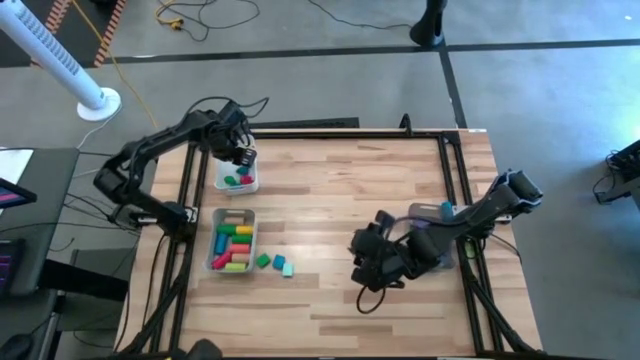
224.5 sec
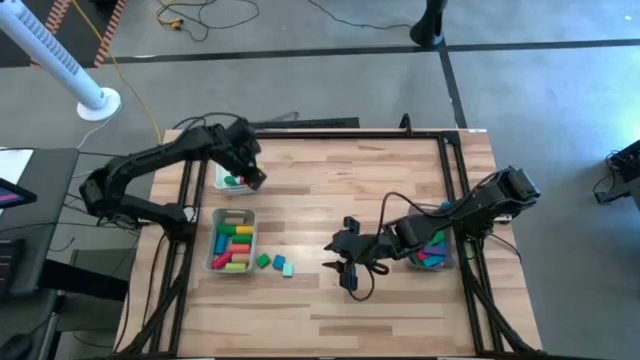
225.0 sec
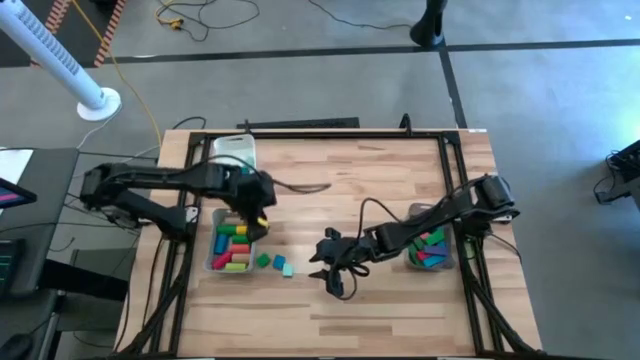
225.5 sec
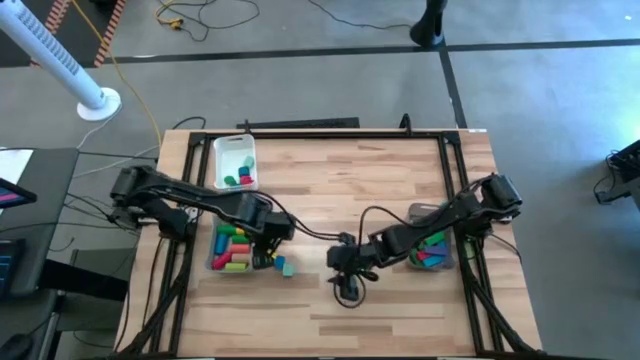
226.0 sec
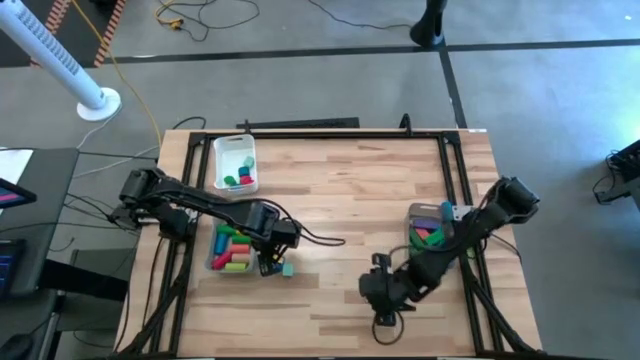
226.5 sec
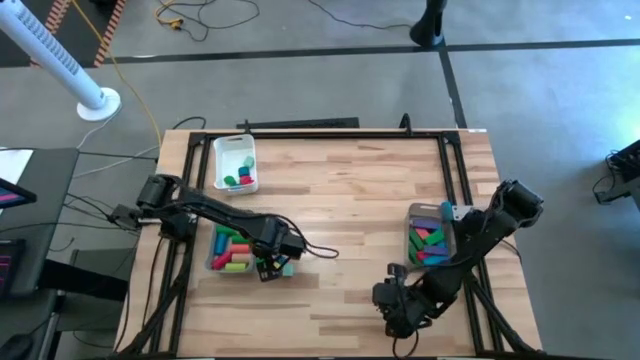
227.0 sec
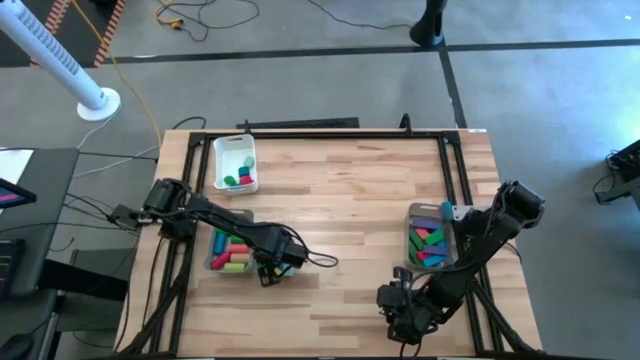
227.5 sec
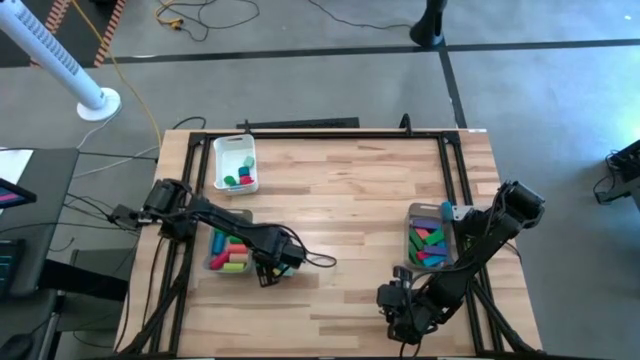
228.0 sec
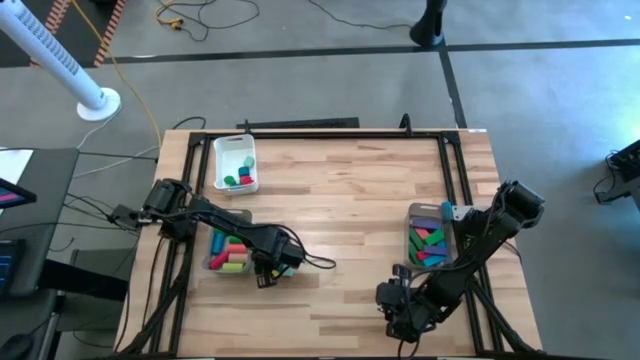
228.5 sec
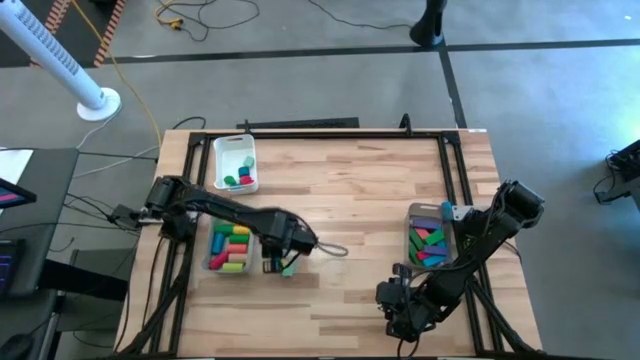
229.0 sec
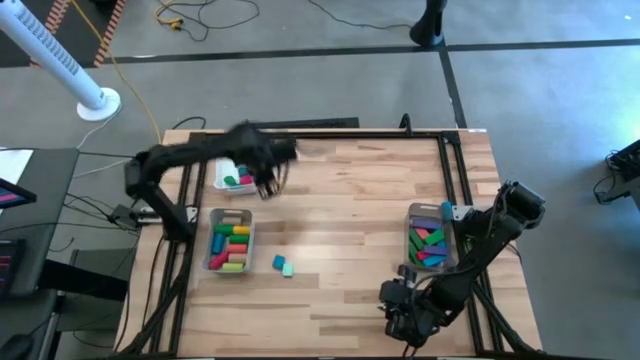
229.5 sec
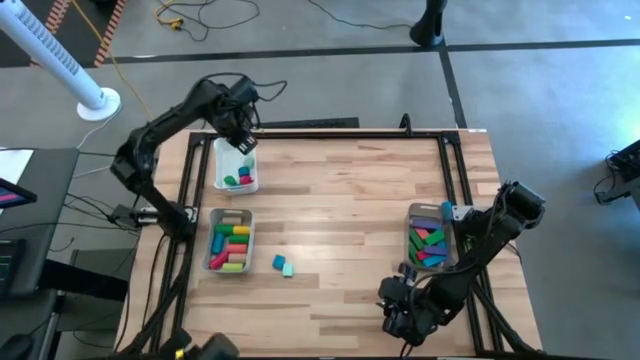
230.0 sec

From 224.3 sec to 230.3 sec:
Task: Sort blocks by size
Put the dark green semicircular block into the white bin

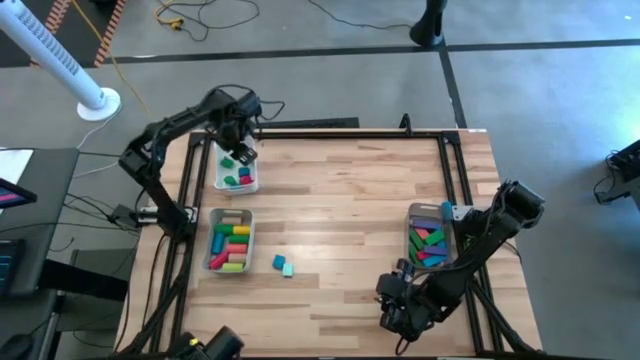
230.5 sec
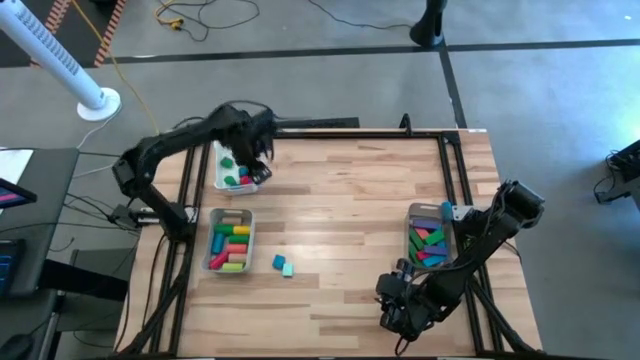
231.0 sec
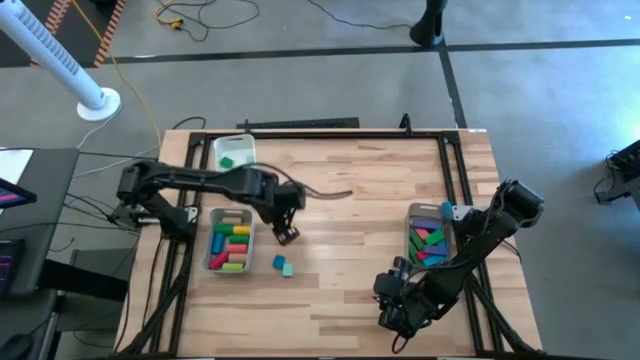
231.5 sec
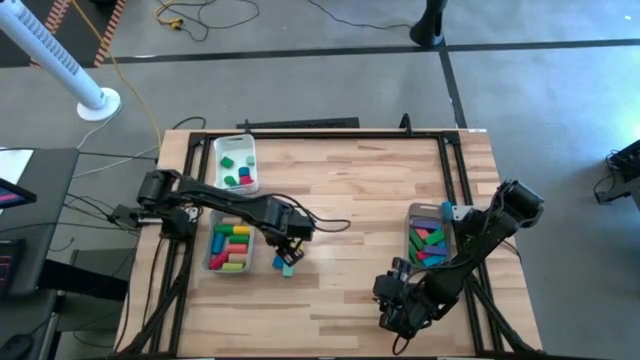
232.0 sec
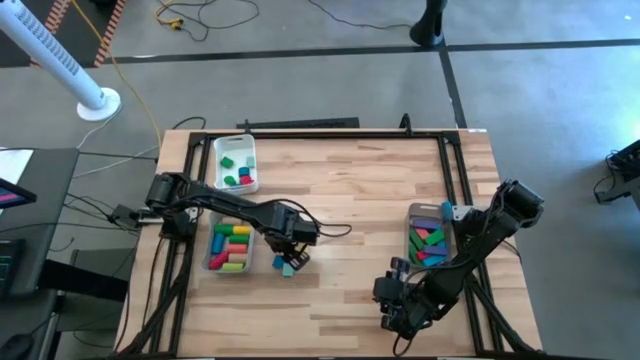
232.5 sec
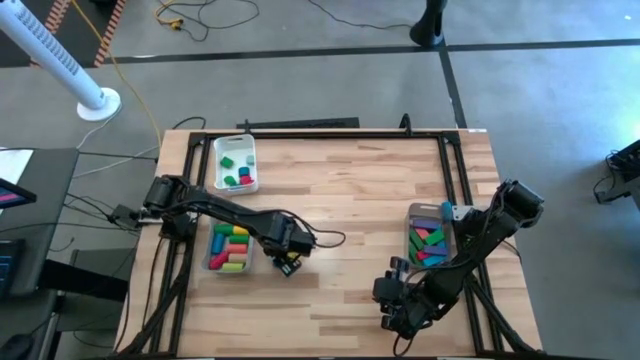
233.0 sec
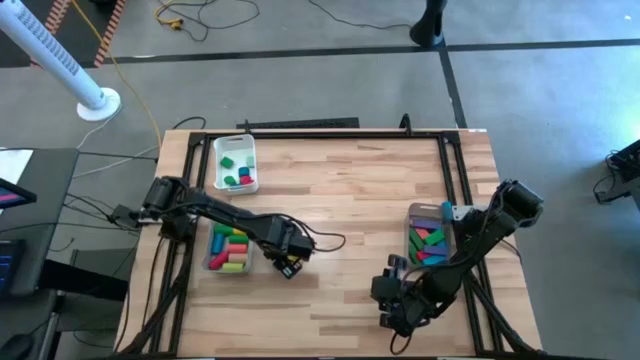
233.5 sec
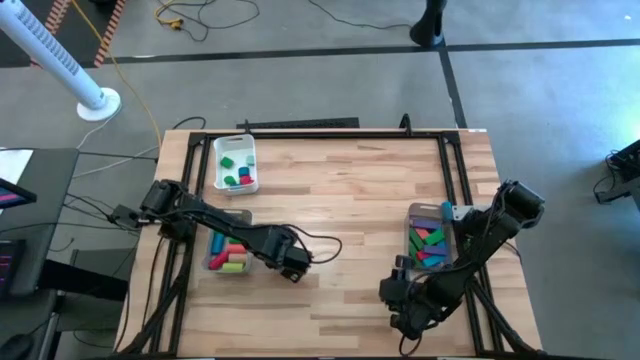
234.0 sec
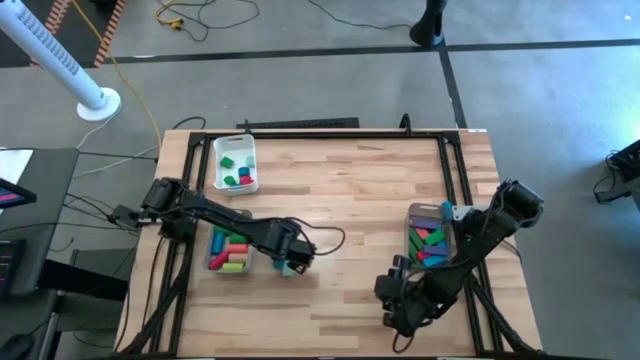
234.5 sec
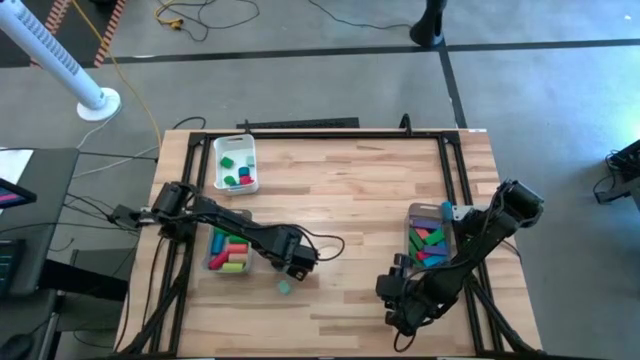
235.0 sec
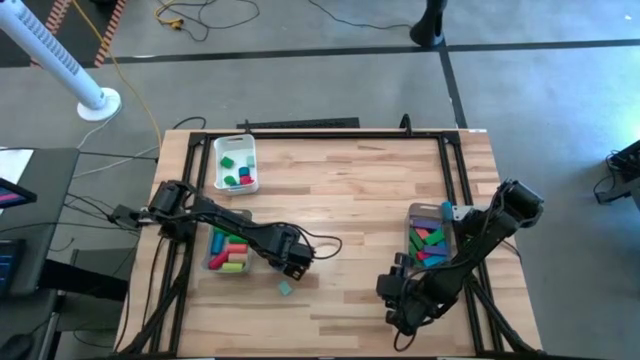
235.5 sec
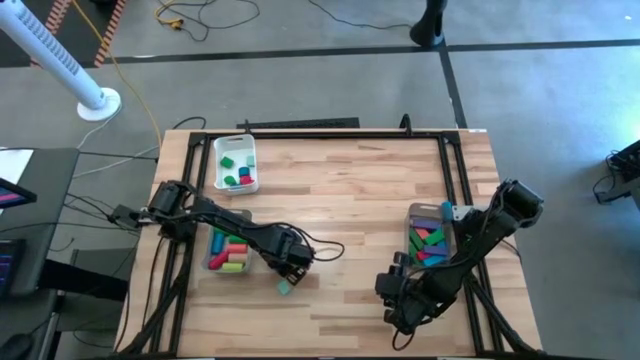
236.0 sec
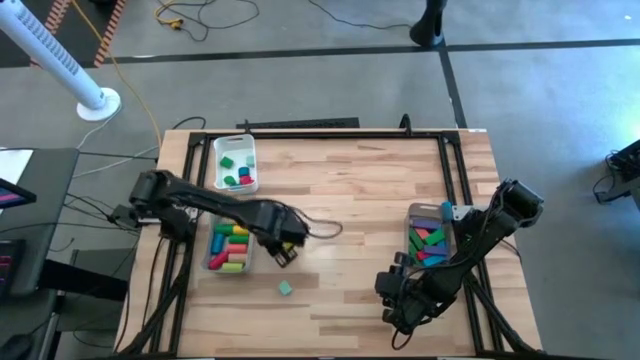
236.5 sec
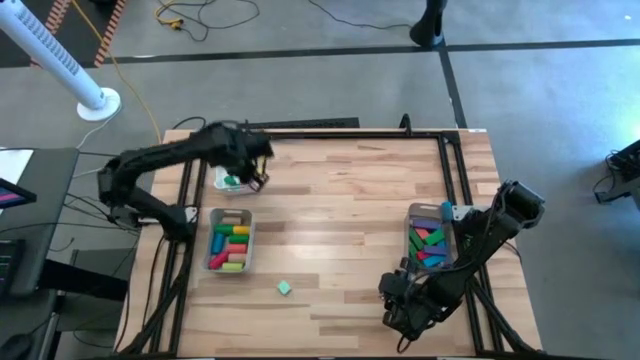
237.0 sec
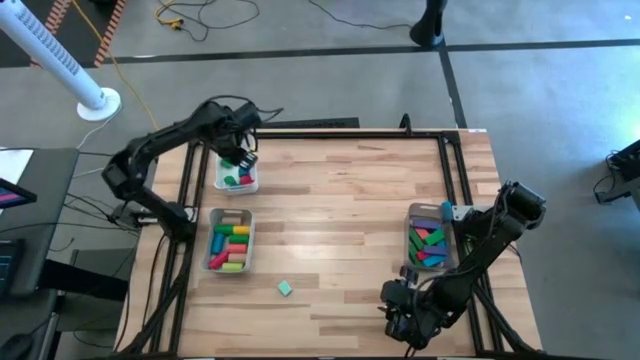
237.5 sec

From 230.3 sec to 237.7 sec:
Put the blue semicircular block into the white bin

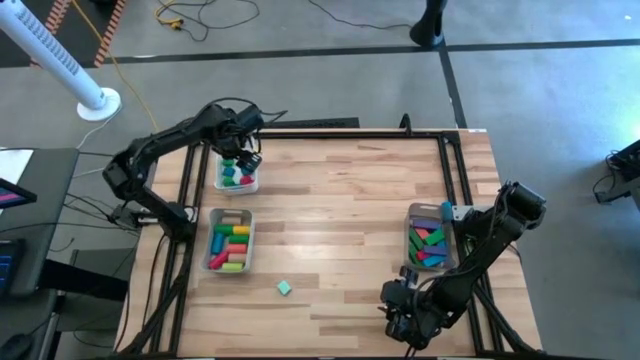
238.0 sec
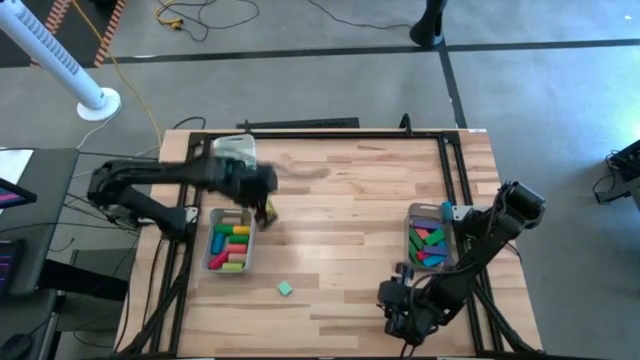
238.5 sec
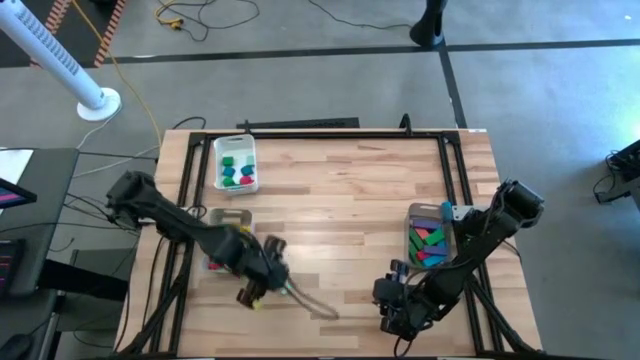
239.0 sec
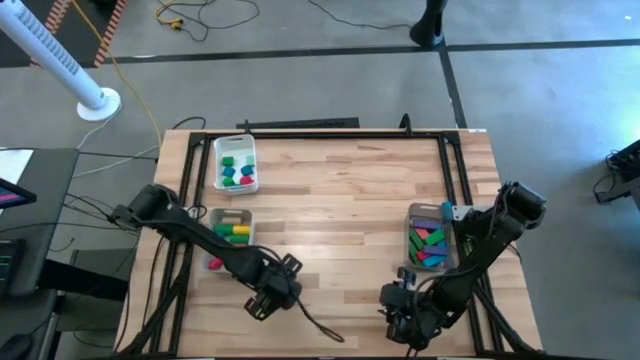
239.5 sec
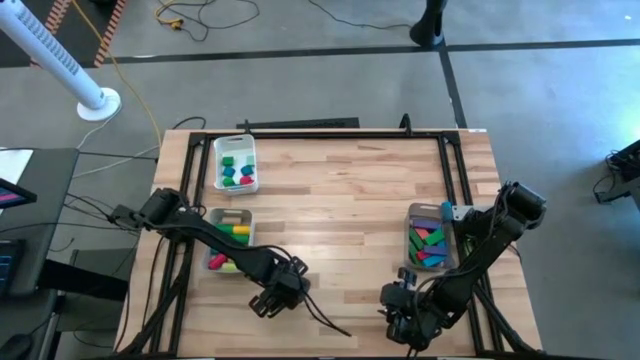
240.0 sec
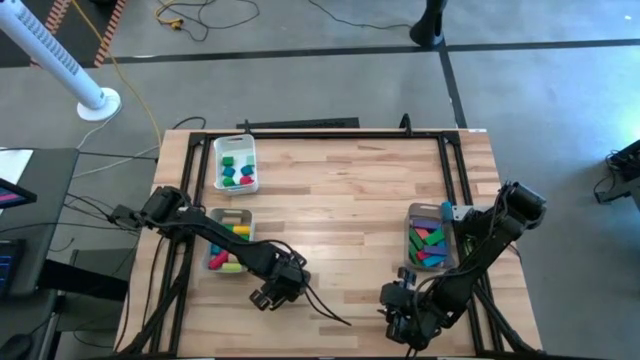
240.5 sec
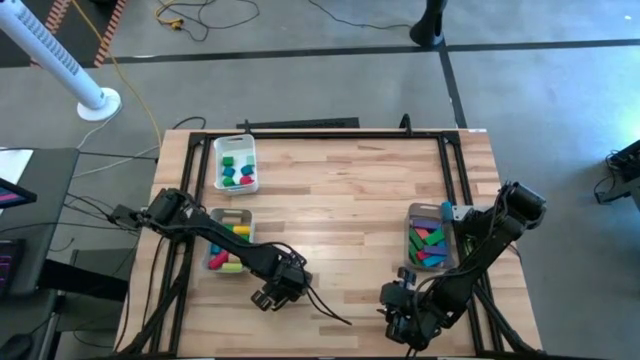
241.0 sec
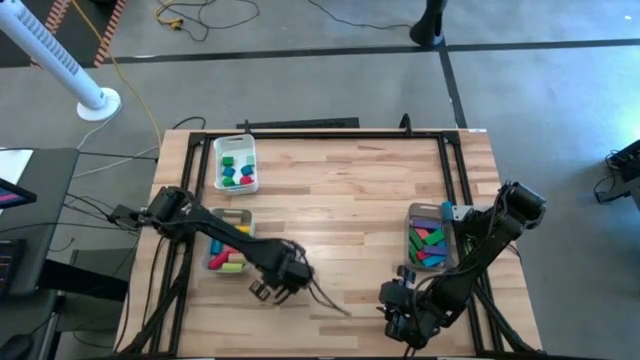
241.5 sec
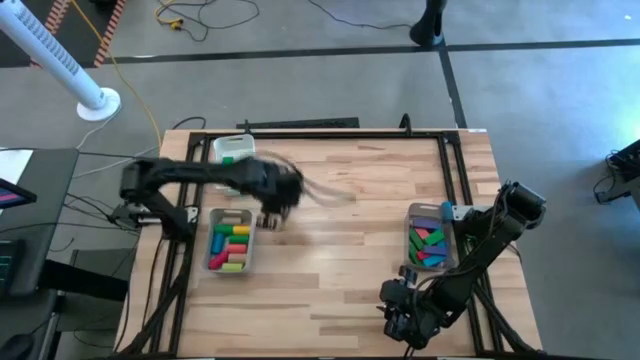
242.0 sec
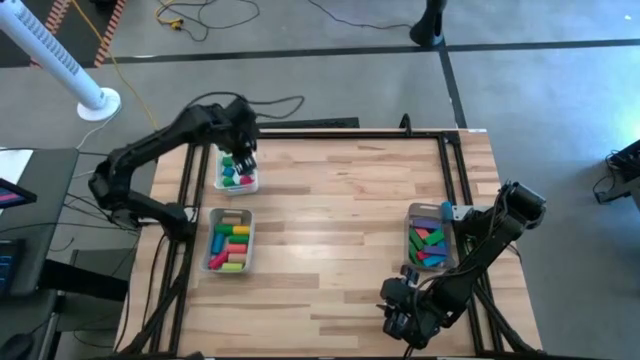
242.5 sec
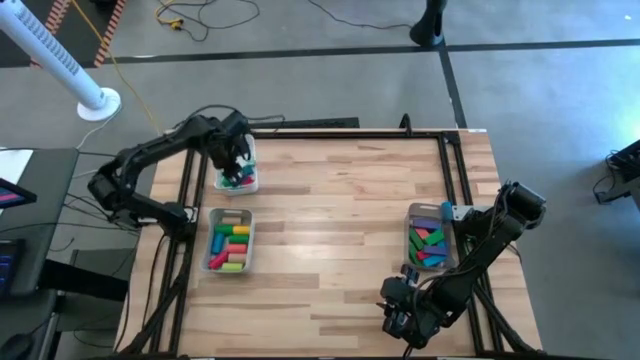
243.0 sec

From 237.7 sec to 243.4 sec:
Put the light blue semicircular block into the white bin

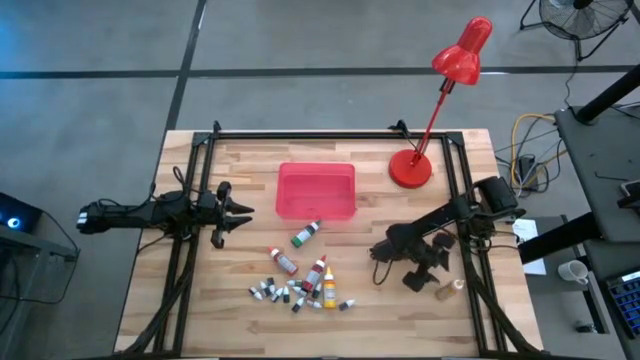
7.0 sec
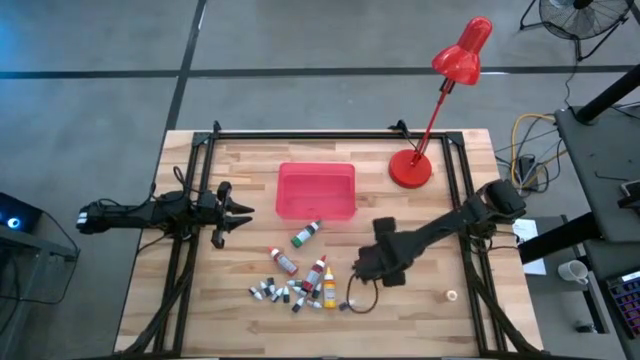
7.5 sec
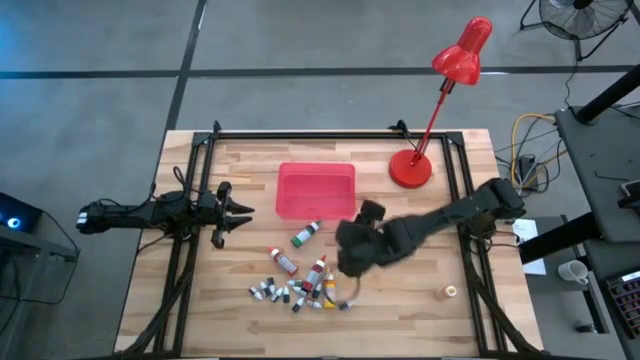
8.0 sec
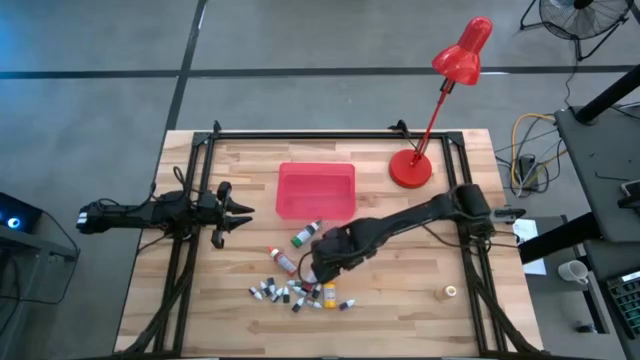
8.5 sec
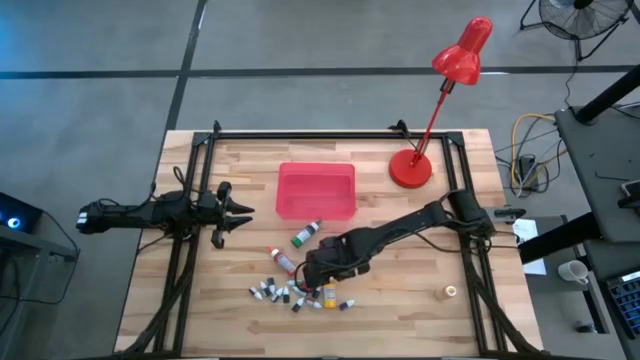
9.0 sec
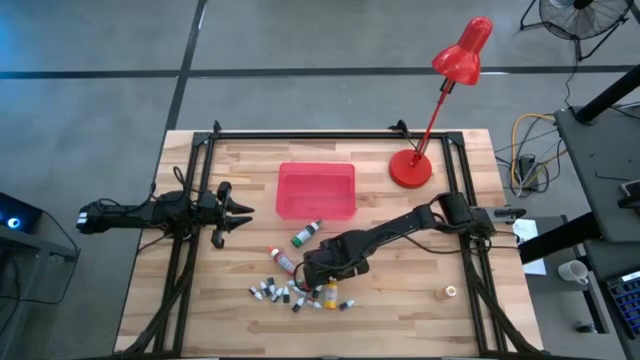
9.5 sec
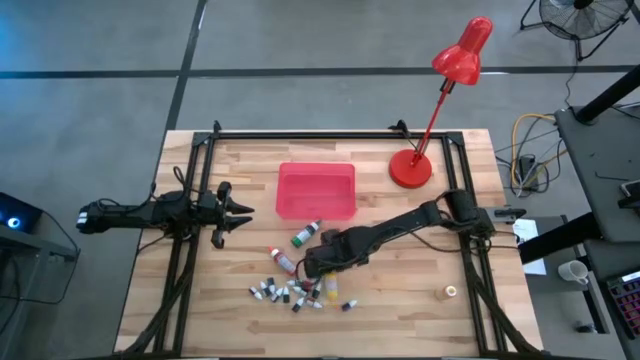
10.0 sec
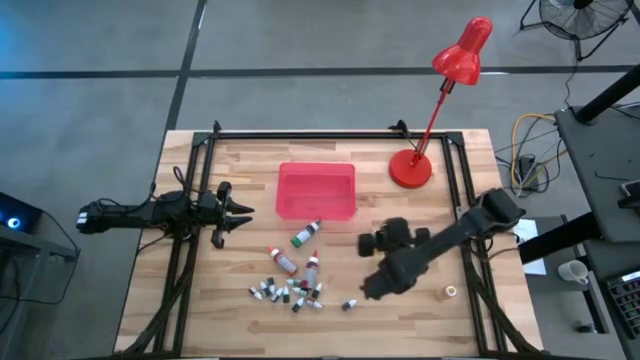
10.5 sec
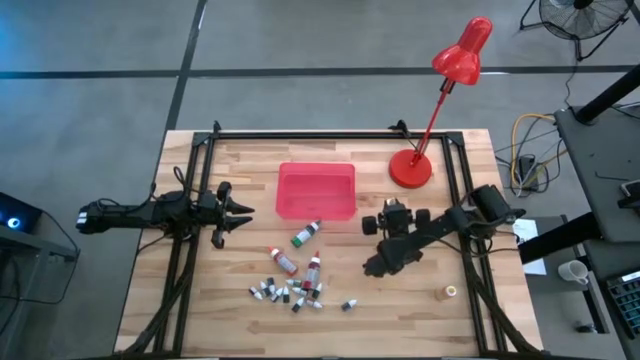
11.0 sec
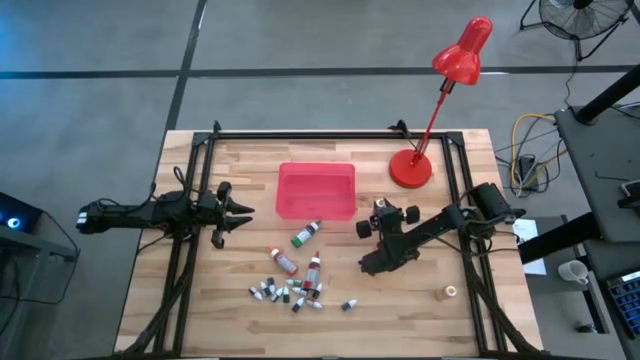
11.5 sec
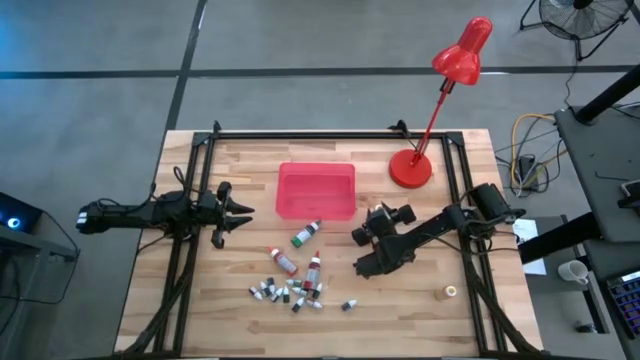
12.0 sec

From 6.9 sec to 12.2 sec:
Task: Pick & Place food coloring
Move the big yellow food coloring bottle to the middle on the table
